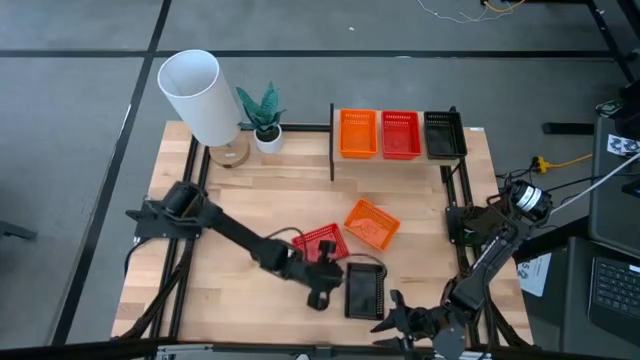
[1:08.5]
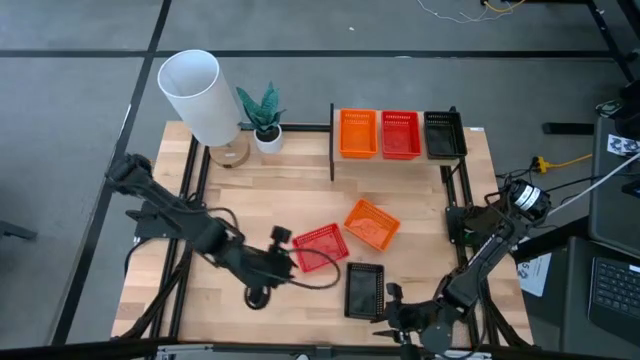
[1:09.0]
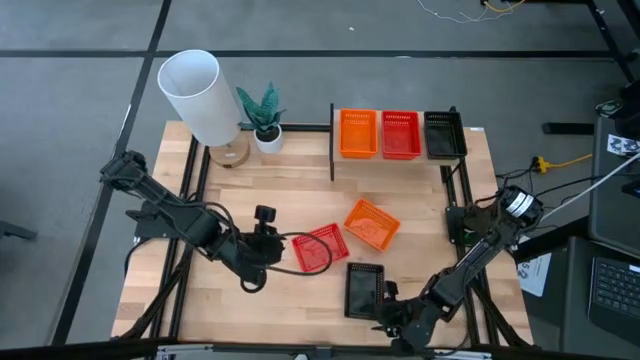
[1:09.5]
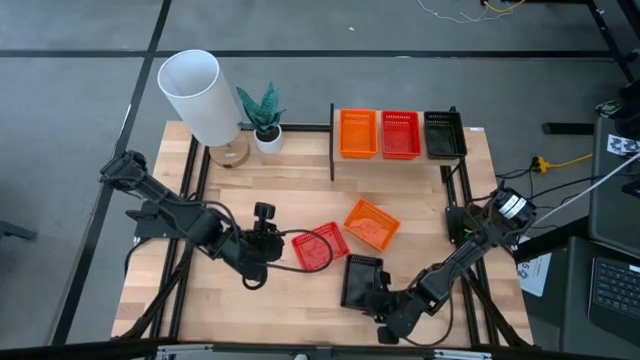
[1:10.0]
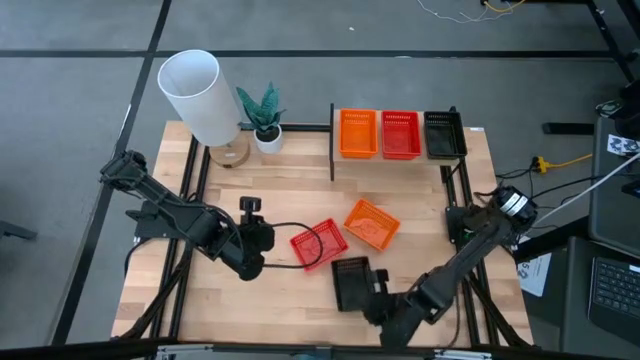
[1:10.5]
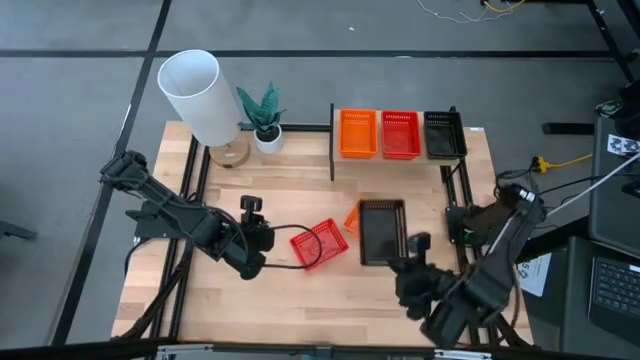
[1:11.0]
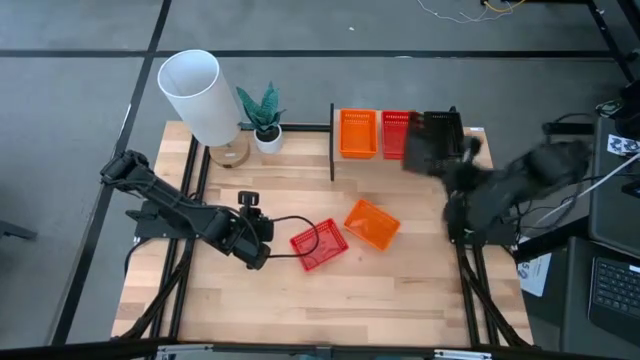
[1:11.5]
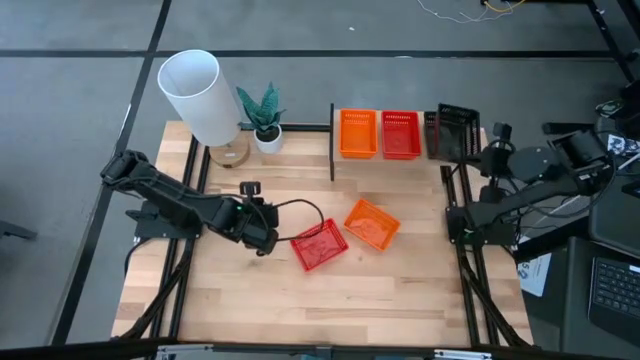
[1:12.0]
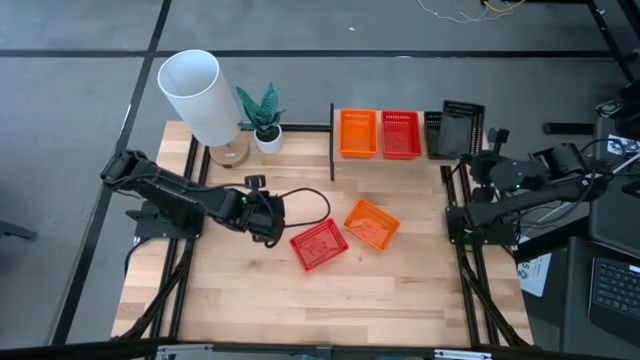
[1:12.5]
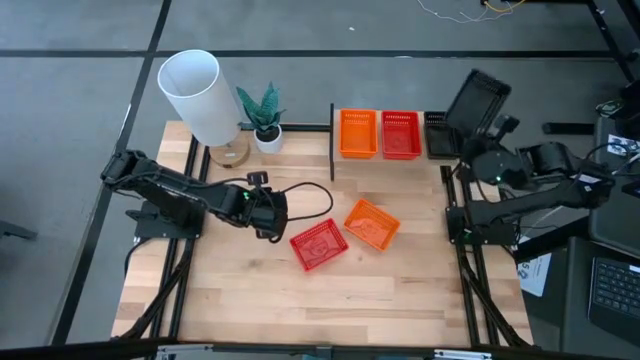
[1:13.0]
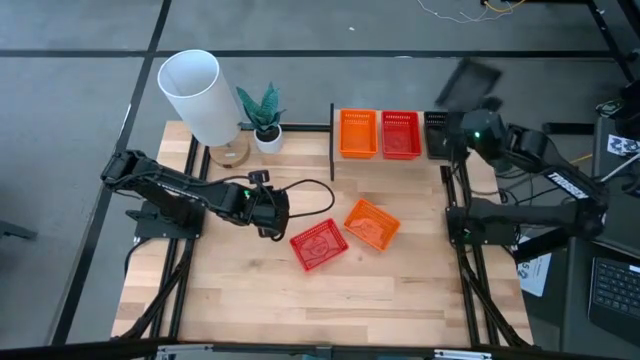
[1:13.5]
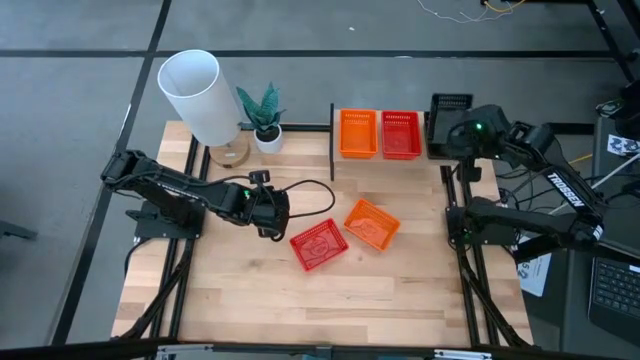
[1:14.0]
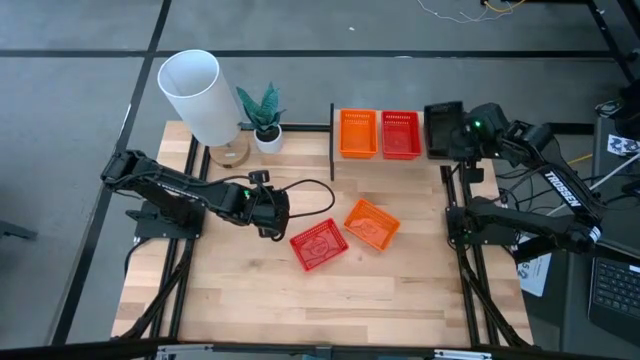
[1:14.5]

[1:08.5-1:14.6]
Task: Stack baskets on shelf by color
Stack the black basket on top of the black basket on the shelf

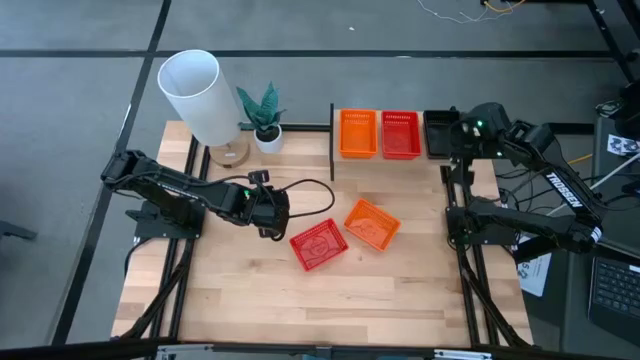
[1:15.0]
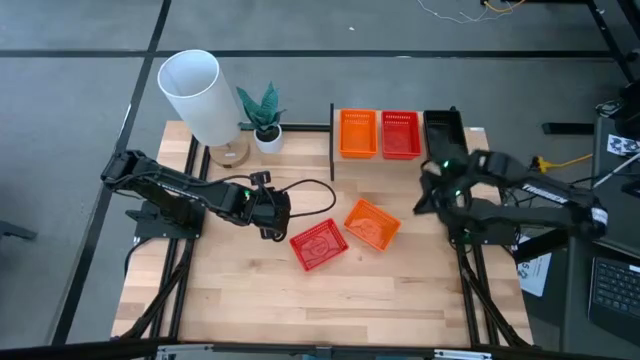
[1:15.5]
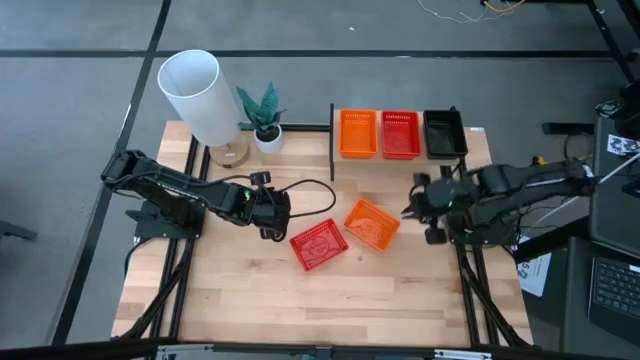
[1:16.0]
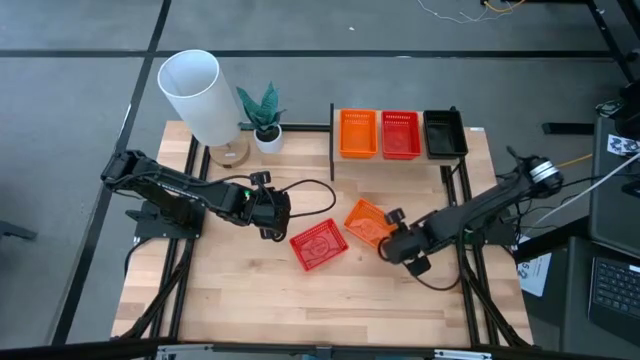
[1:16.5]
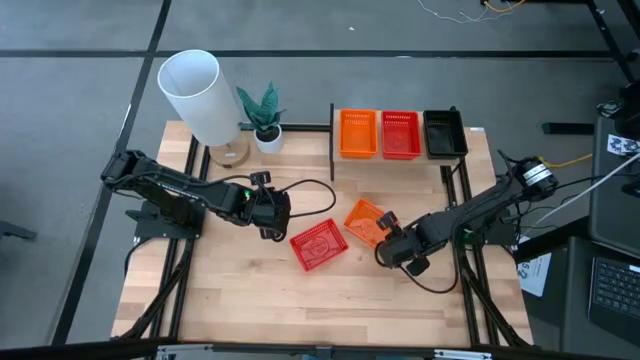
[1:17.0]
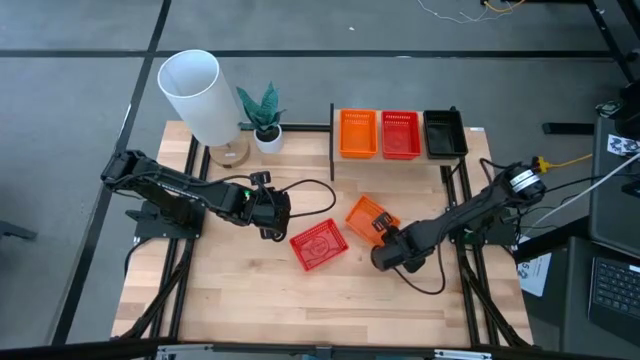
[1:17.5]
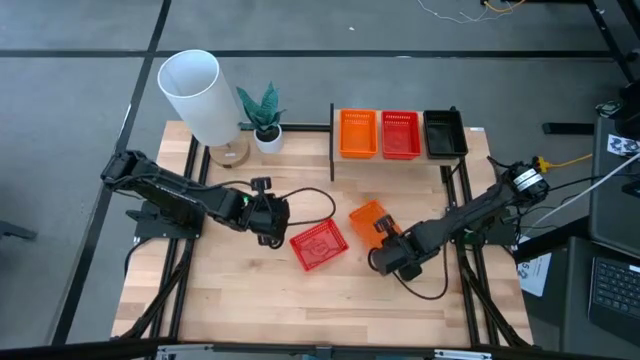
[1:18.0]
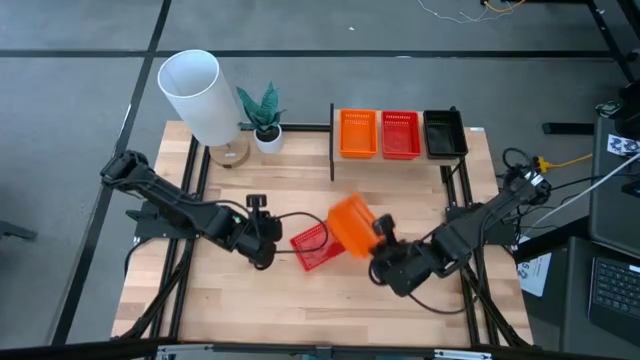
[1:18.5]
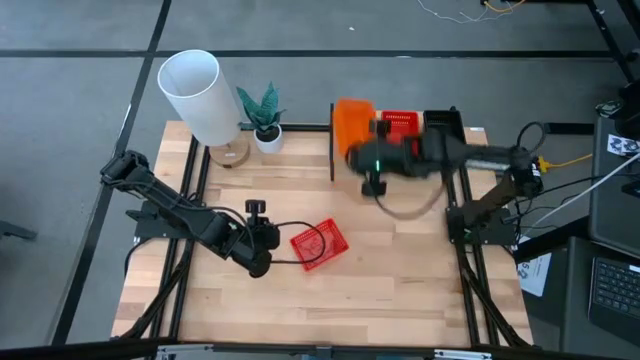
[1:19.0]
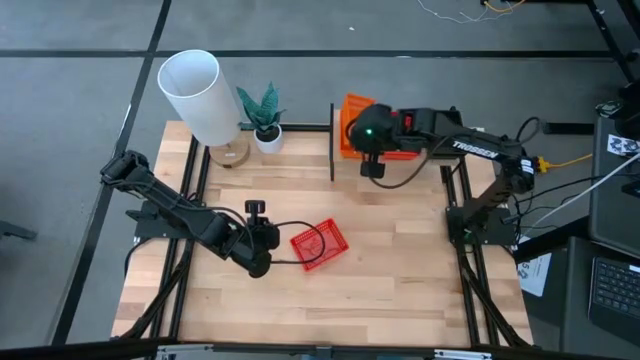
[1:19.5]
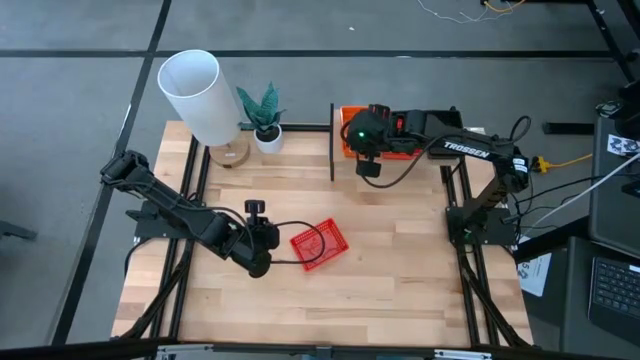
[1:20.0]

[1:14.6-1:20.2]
Stack the orange basket on top of the orange basket on the shelf

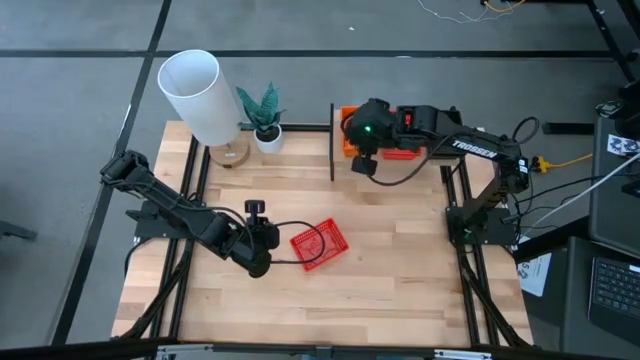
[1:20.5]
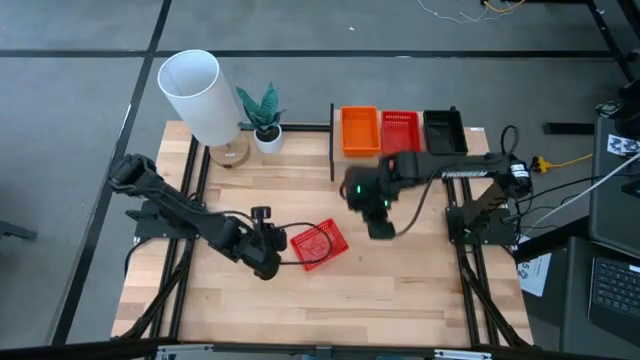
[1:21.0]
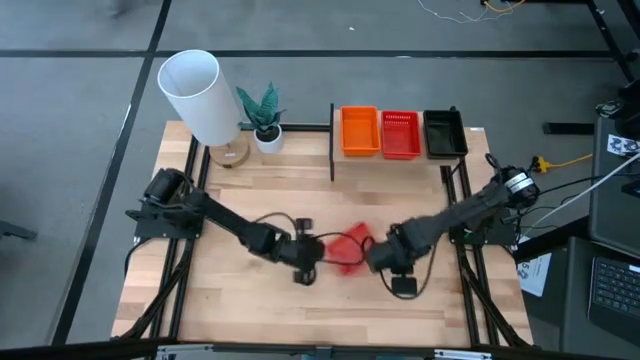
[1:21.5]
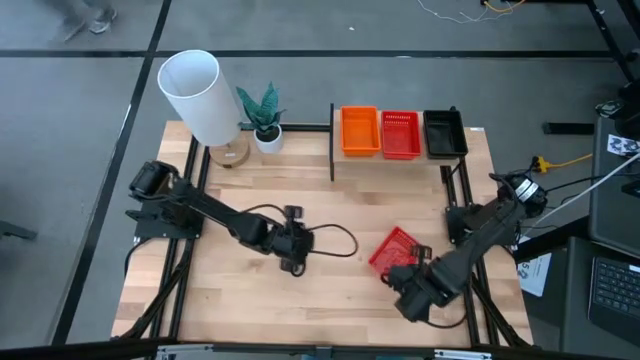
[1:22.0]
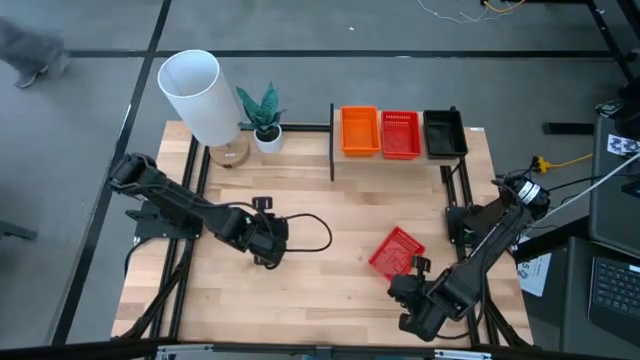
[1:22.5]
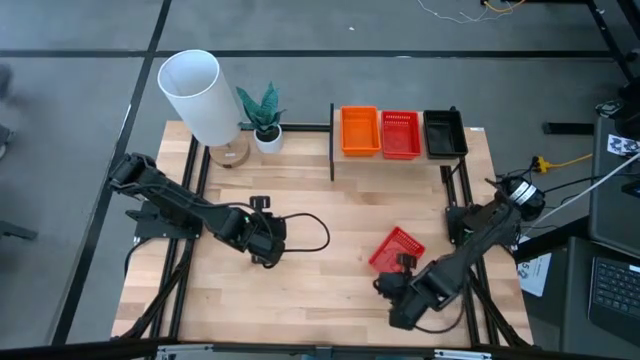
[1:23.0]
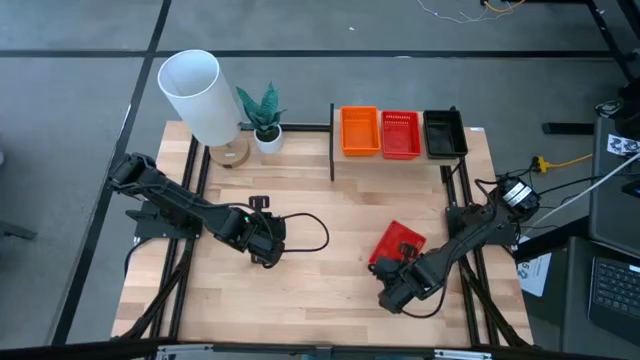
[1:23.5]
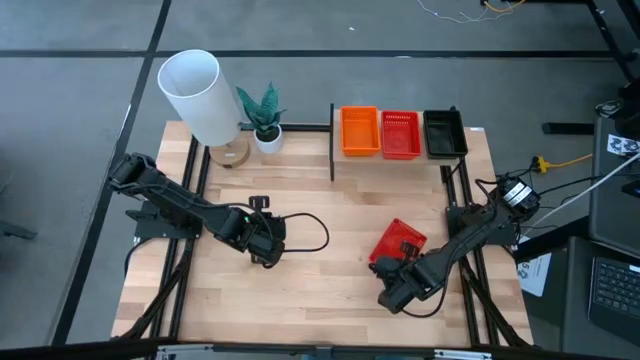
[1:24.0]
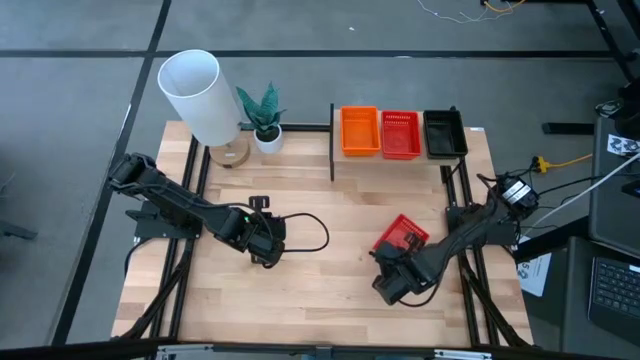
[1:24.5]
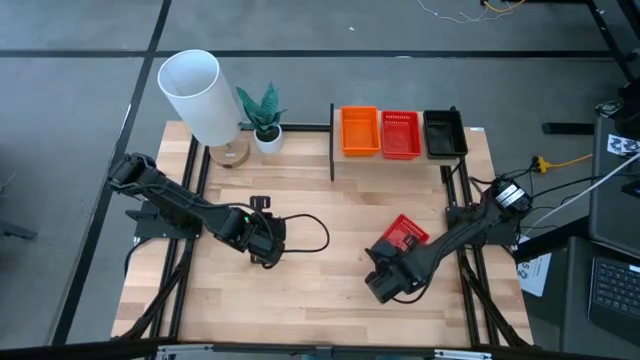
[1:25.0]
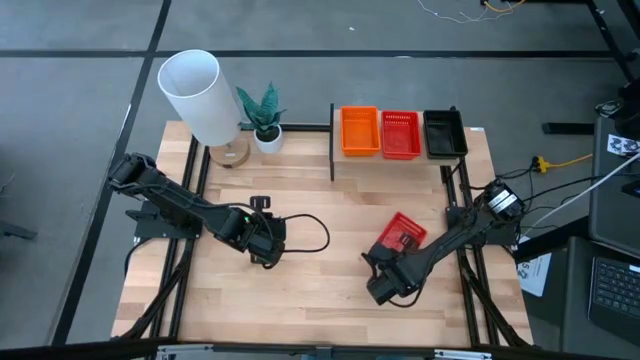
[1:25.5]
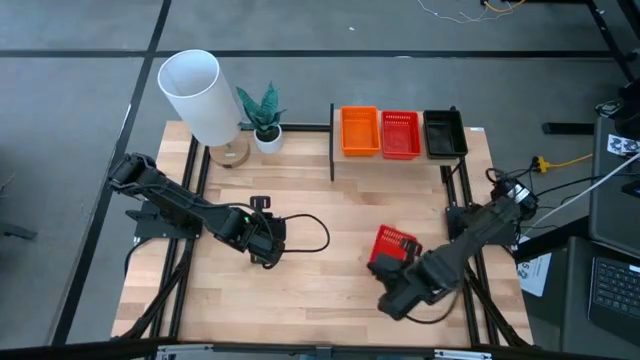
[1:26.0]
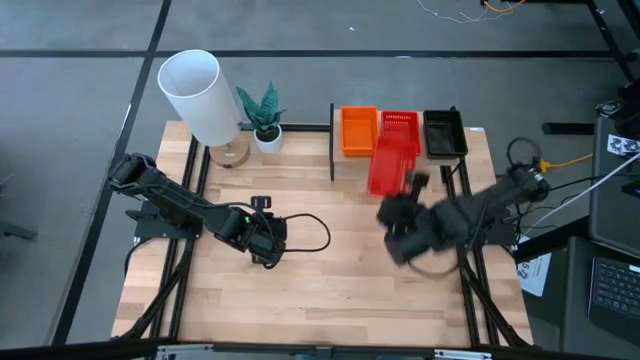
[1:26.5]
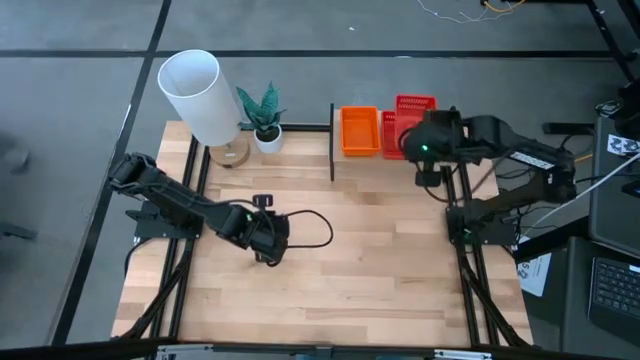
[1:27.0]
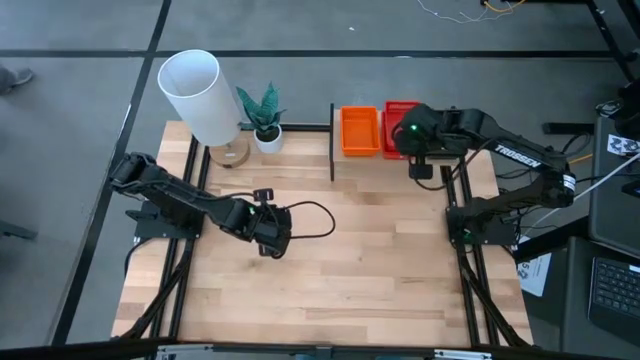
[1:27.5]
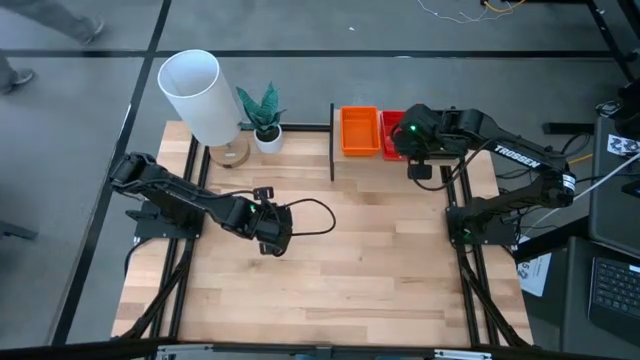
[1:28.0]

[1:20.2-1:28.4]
Stack the red basket on top of the red basket on the shelf

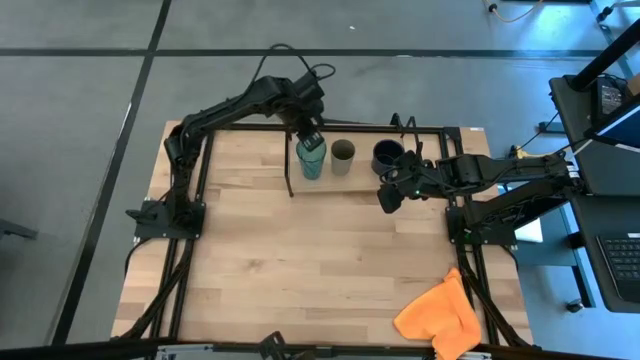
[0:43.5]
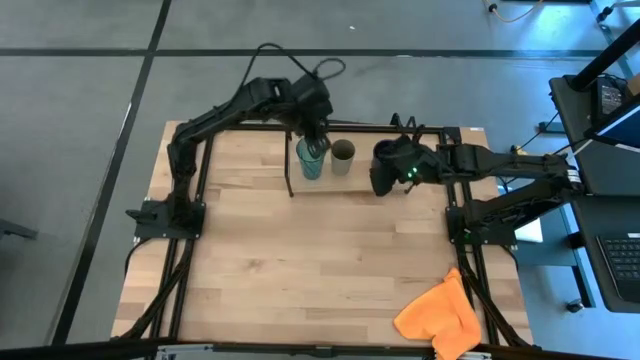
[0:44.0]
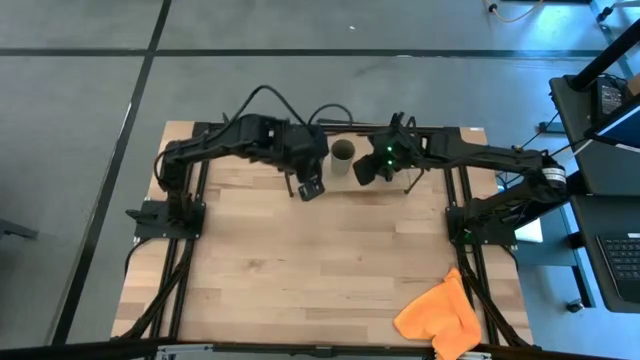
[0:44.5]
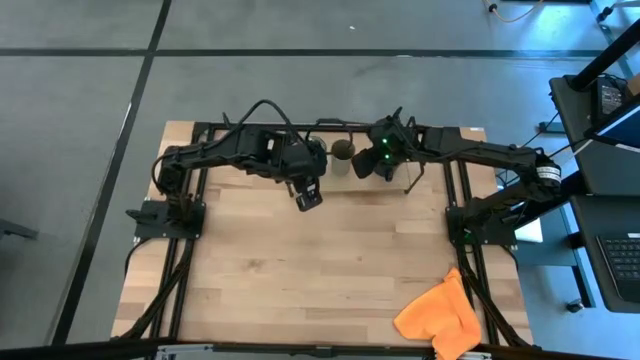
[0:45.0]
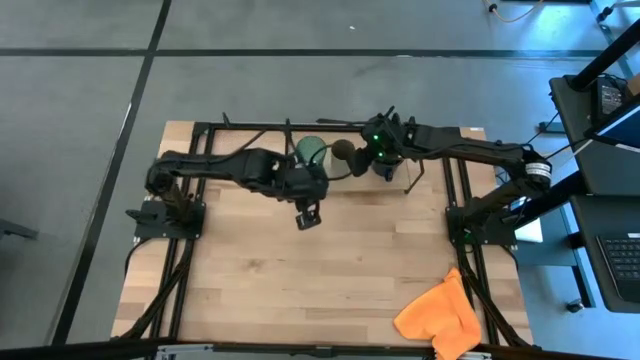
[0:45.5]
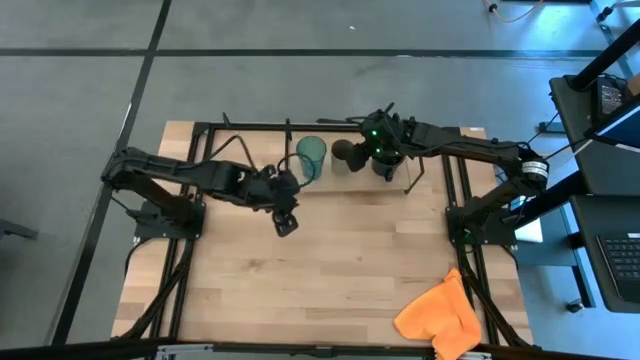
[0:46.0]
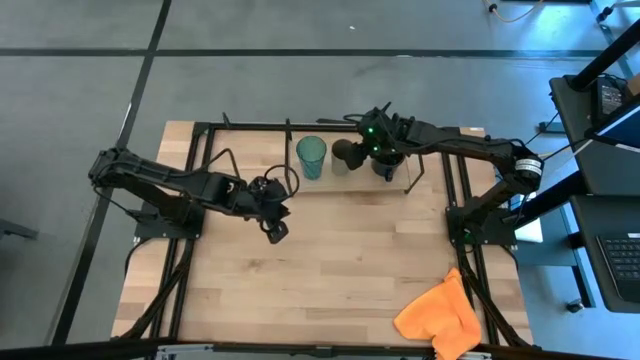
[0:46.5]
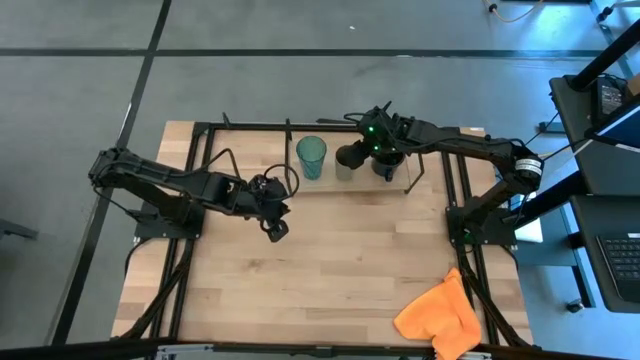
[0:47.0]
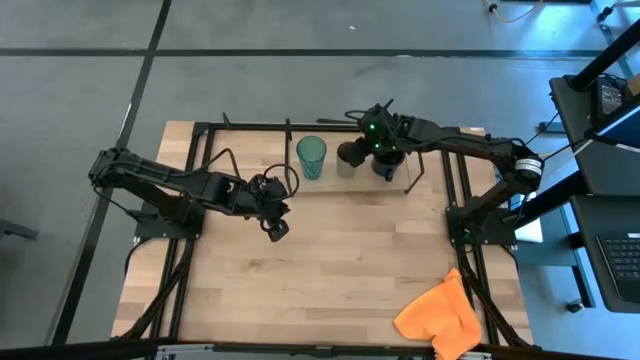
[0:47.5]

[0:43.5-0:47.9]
Task: Stack small to large cups/mugs on shelf
Adjust the grey cup
